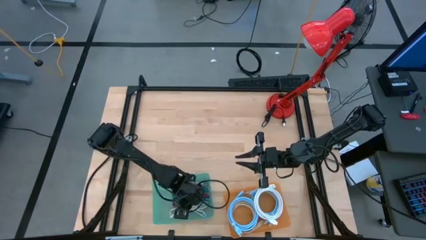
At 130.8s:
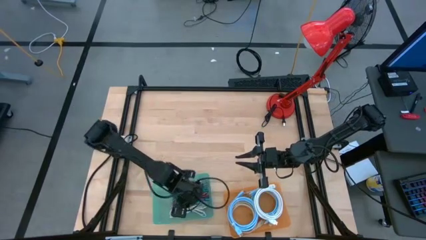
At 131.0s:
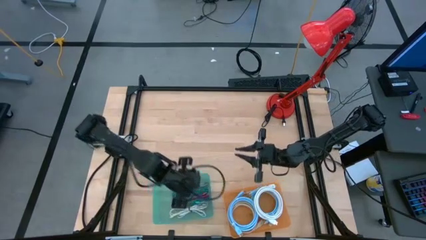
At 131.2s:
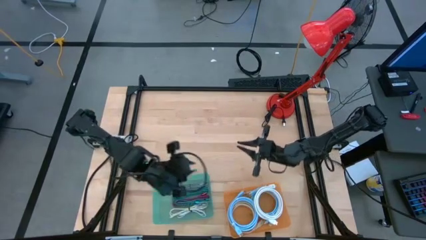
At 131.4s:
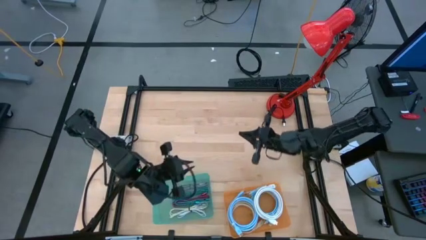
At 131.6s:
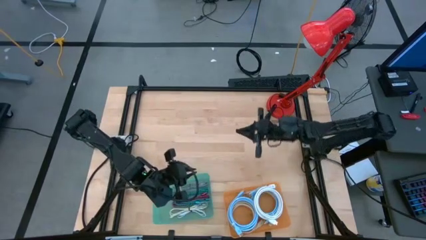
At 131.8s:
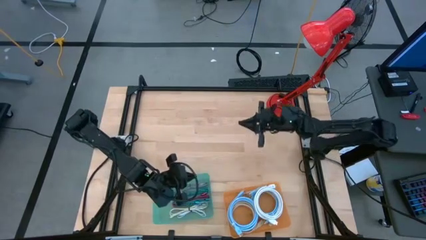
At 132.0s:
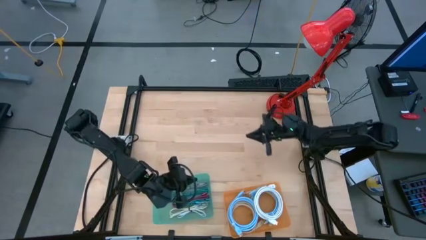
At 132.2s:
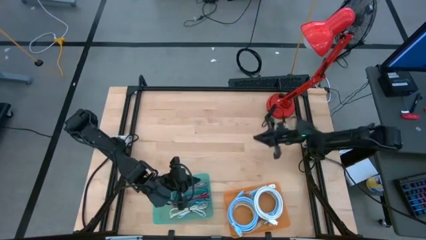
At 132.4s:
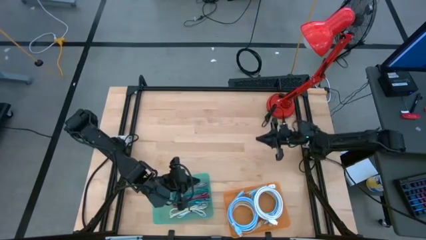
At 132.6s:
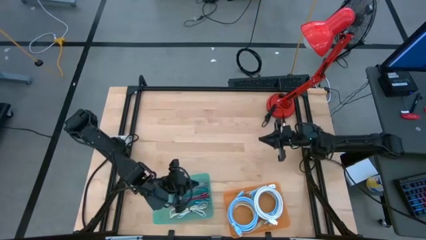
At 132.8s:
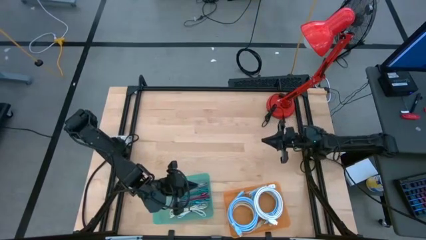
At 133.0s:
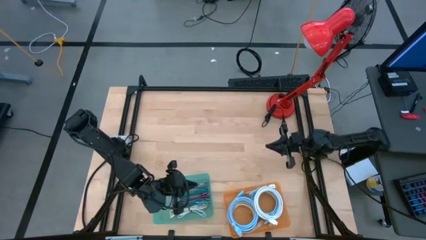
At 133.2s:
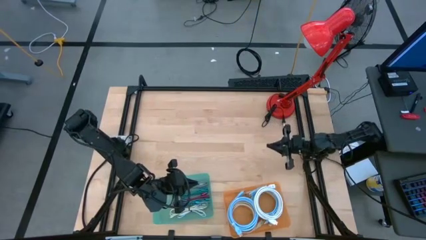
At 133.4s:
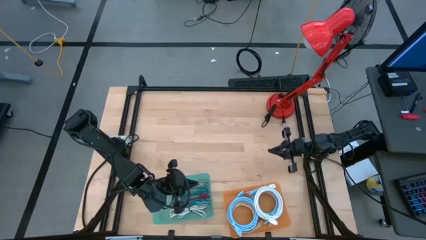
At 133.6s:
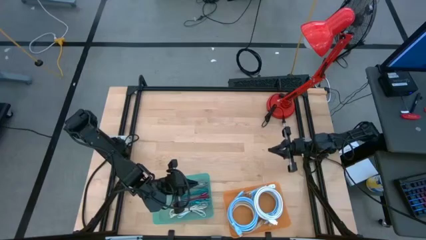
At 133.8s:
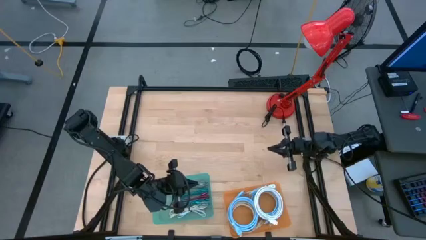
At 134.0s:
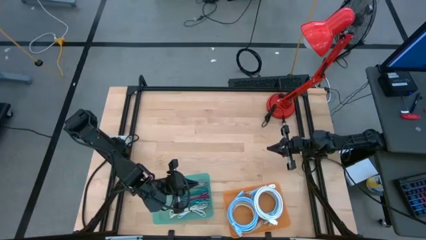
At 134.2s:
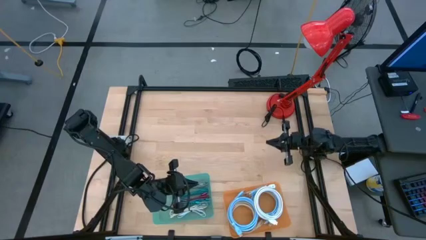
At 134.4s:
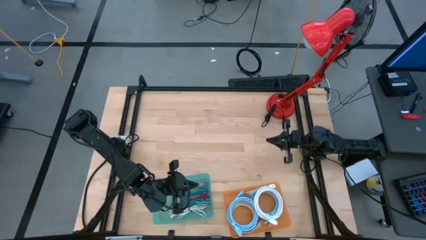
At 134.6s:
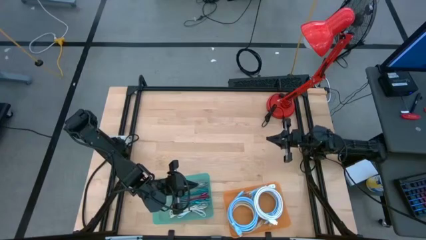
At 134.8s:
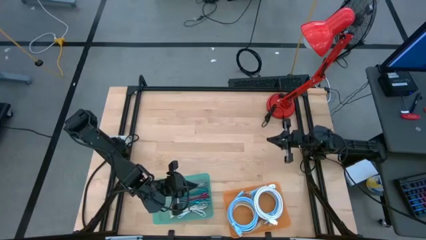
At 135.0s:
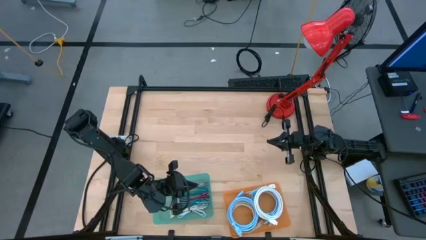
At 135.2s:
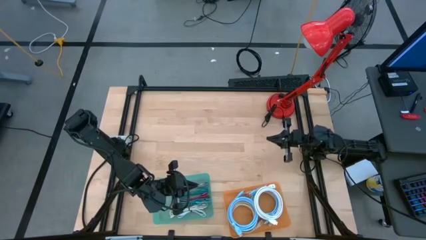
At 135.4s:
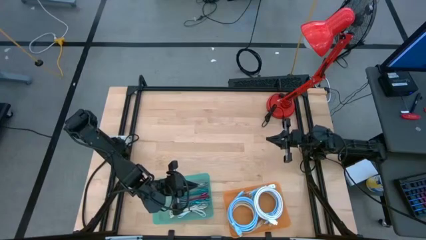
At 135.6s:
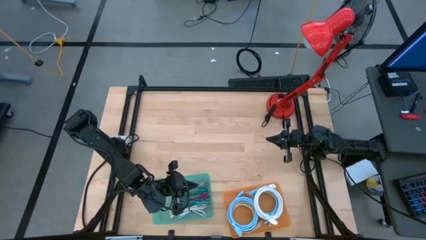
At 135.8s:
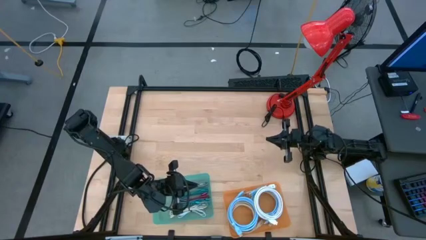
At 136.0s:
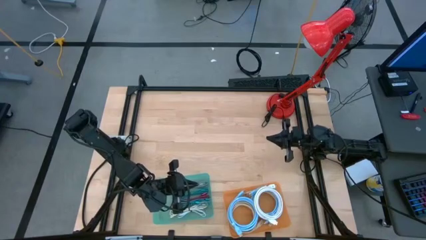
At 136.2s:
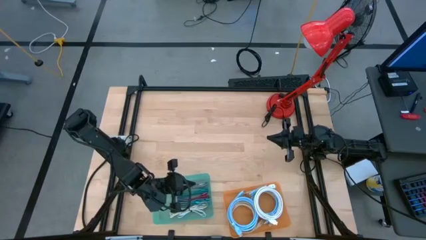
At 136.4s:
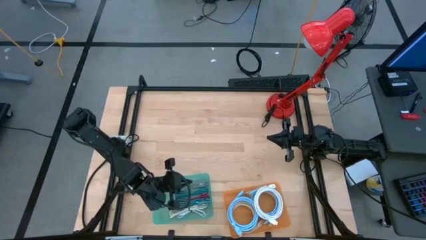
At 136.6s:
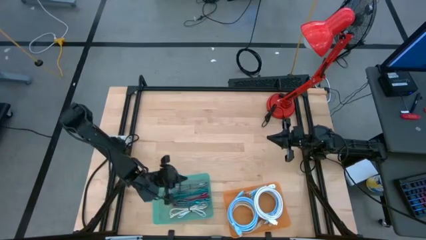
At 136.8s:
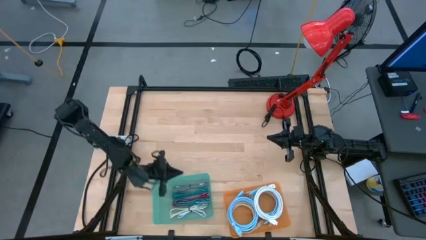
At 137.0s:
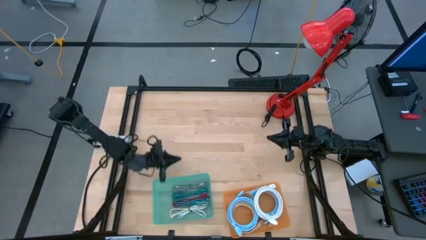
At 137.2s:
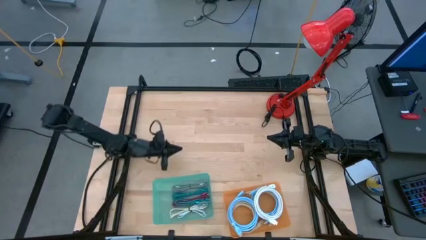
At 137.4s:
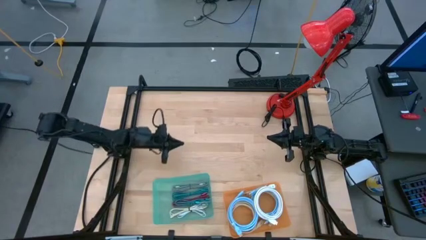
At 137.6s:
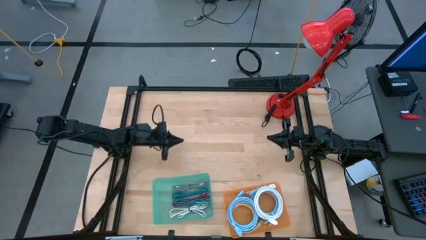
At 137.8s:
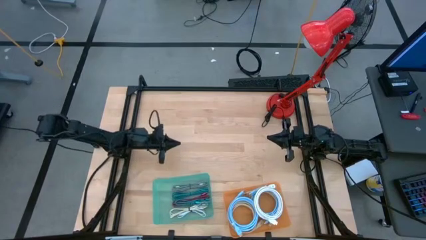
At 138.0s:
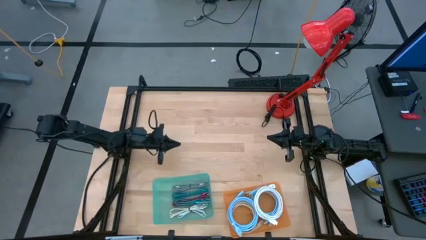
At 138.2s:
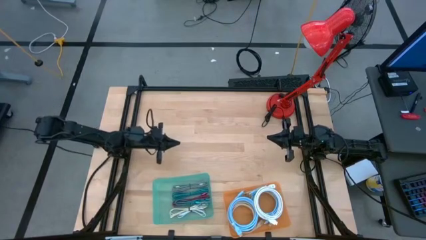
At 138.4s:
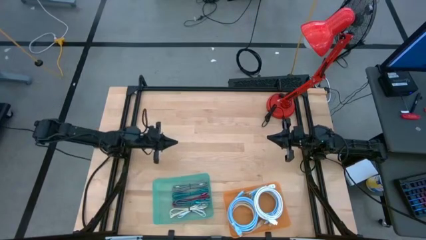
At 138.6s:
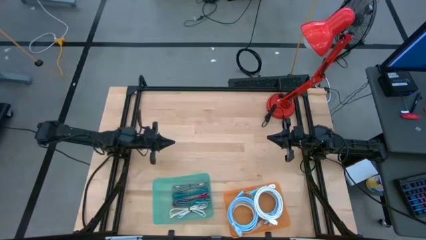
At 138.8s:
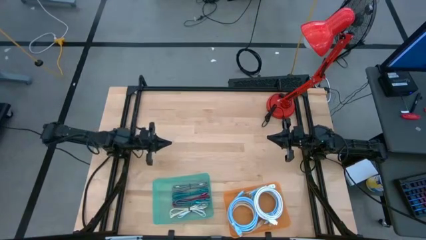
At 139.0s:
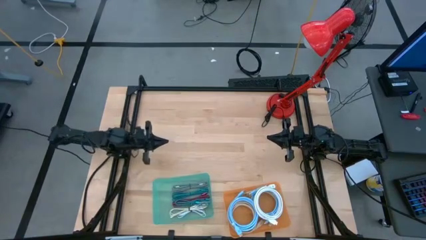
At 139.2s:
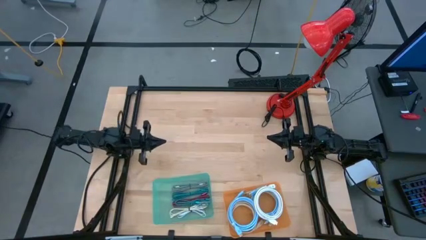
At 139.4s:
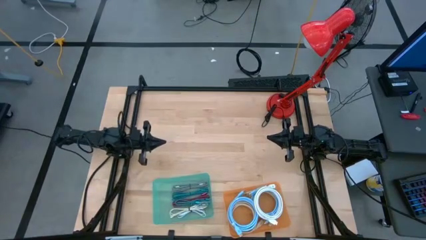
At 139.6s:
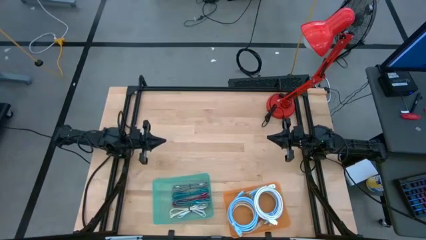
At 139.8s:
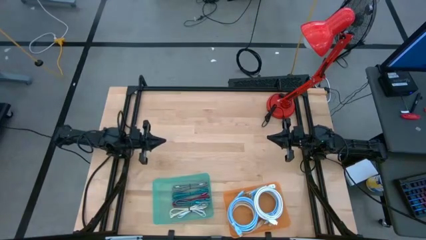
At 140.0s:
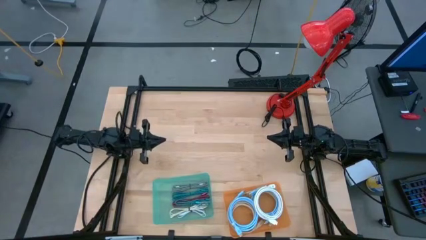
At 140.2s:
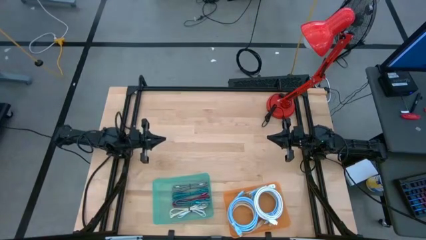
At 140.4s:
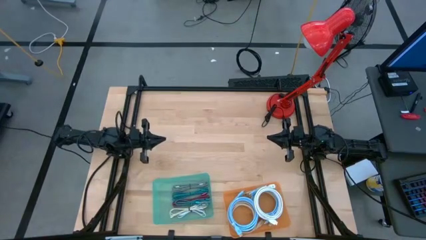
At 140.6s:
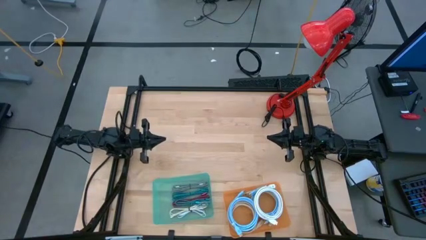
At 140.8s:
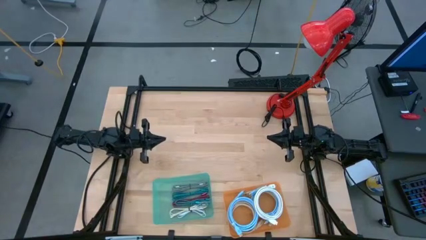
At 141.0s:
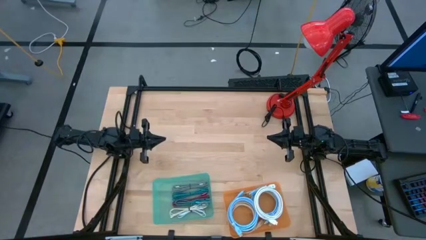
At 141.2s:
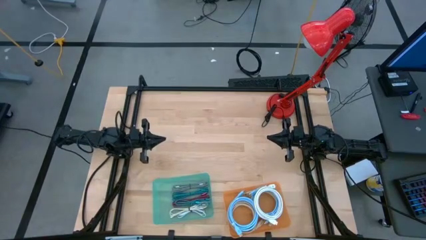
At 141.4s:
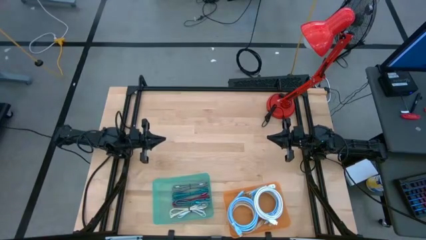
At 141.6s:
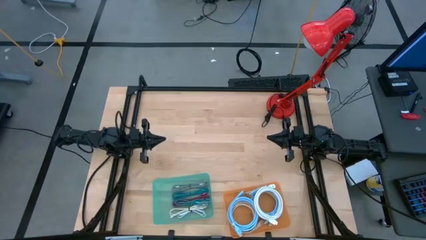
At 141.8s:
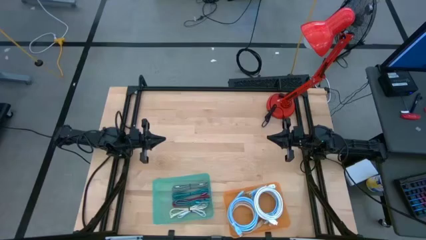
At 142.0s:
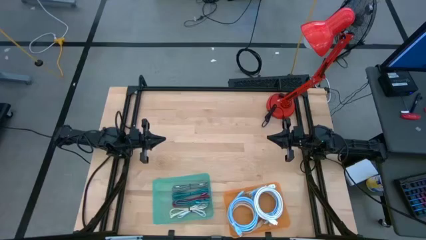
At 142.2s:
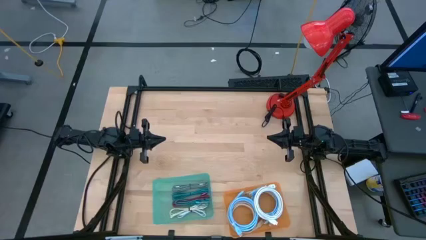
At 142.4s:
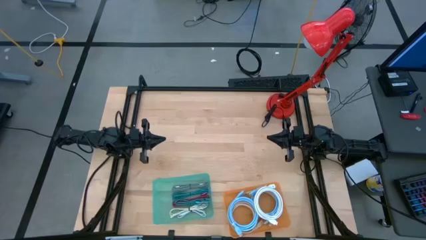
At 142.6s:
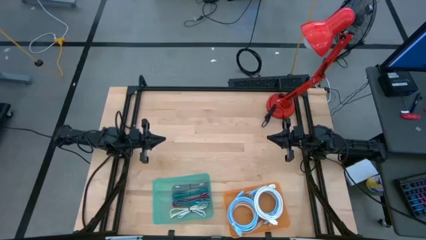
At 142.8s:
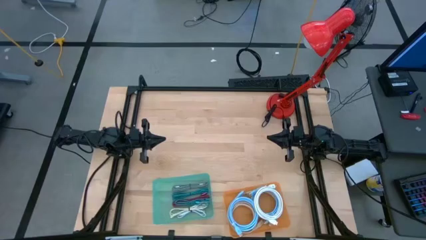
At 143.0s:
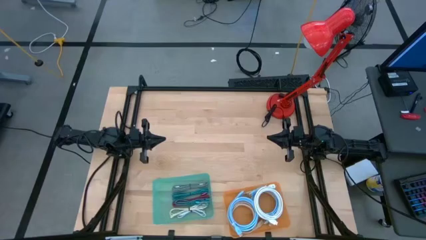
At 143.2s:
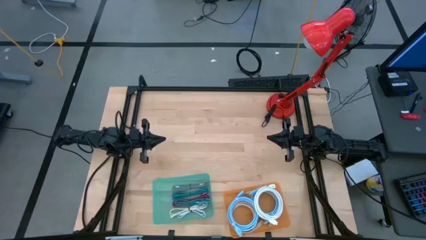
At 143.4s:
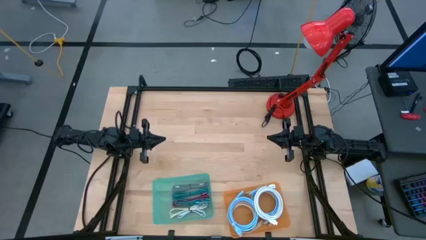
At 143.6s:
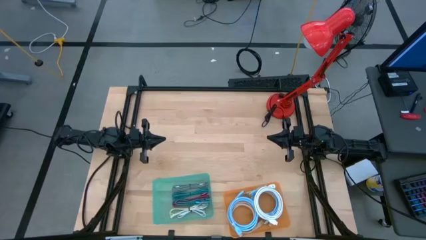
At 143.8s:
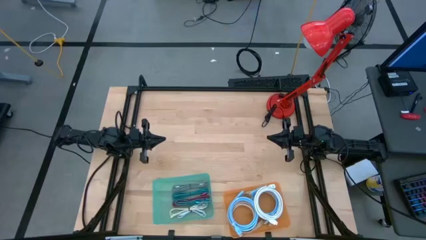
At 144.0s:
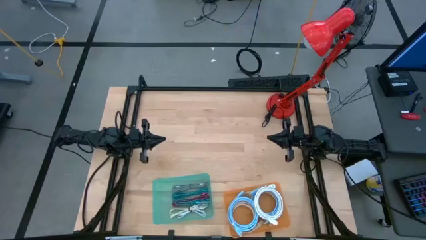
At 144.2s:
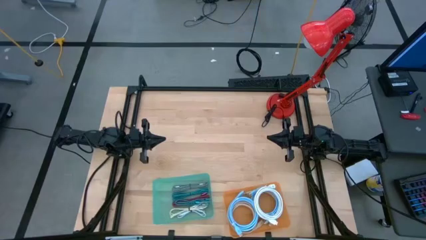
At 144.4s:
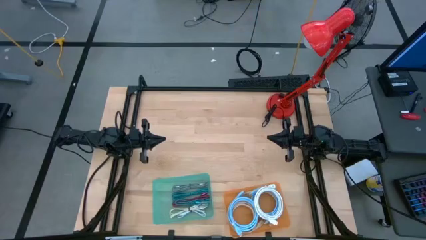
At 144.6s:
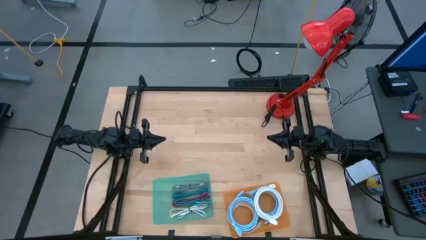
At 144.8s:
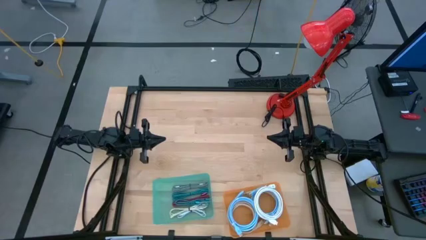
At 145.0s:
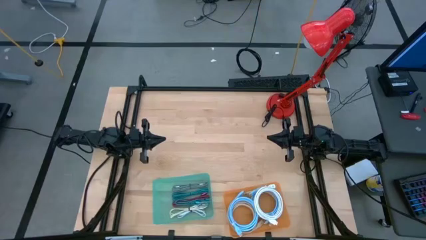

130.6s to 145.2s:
Task: Pick & Place USB Port
Return to Home Position
